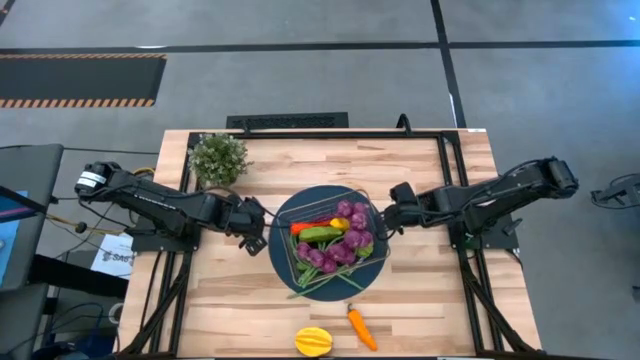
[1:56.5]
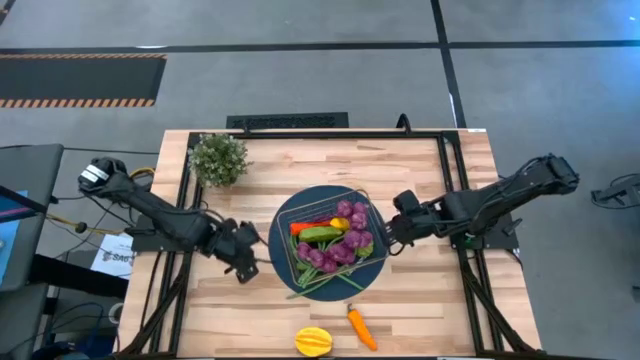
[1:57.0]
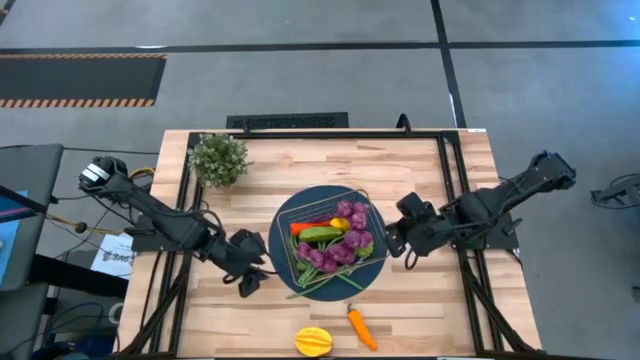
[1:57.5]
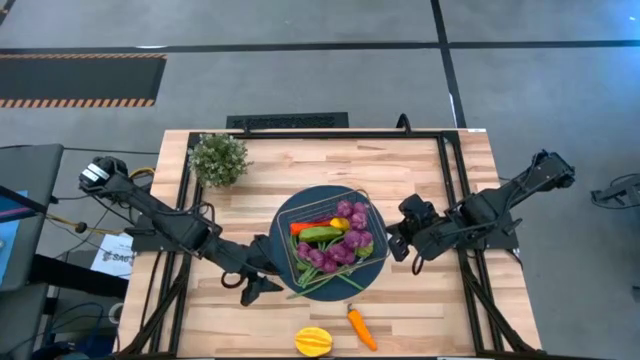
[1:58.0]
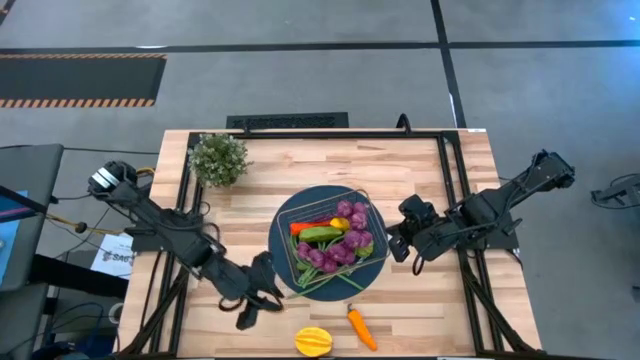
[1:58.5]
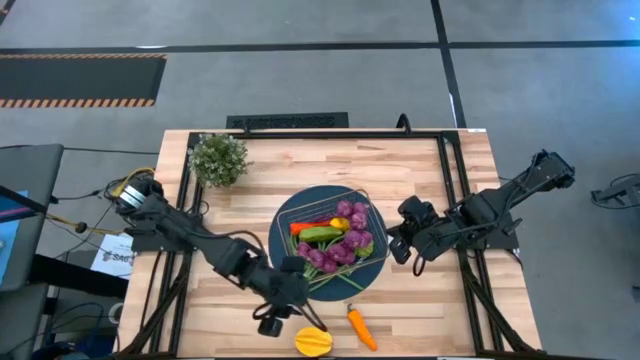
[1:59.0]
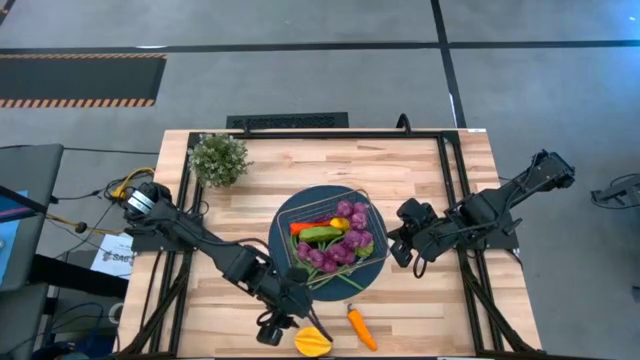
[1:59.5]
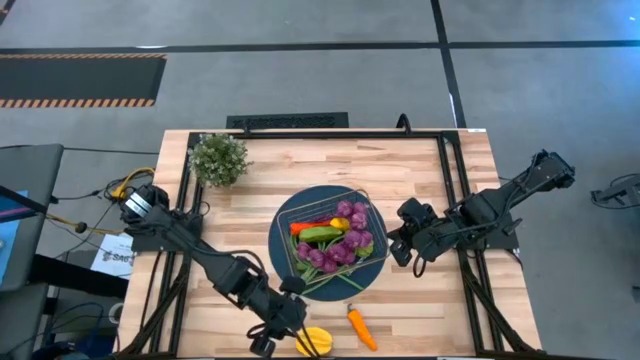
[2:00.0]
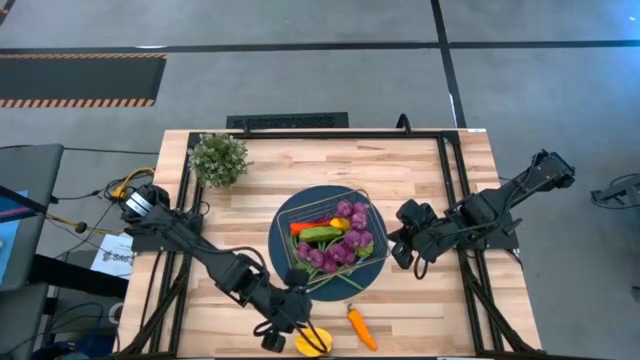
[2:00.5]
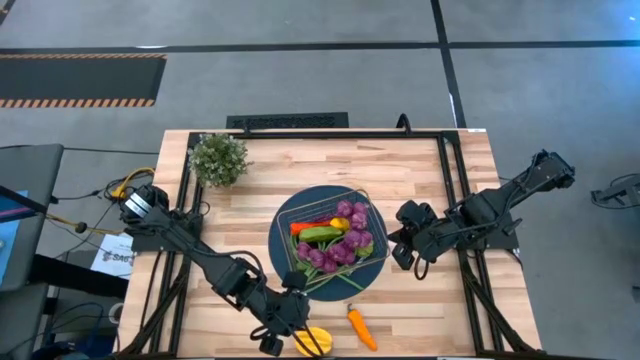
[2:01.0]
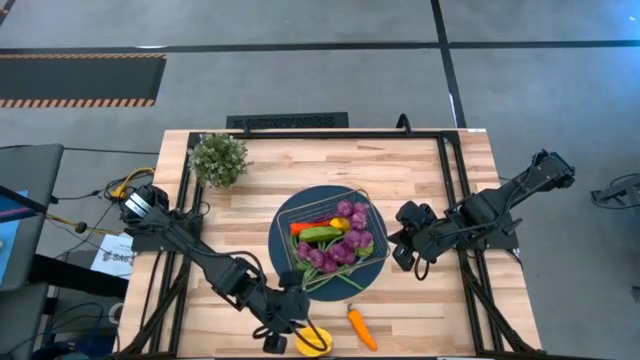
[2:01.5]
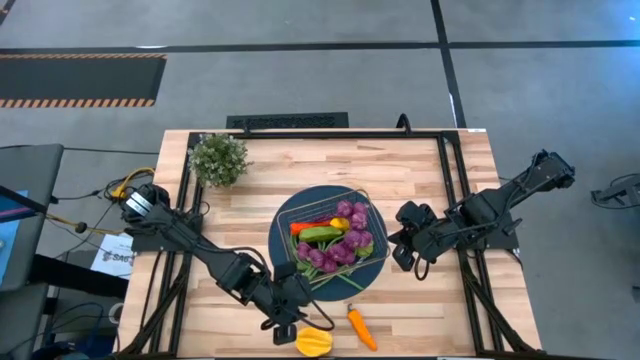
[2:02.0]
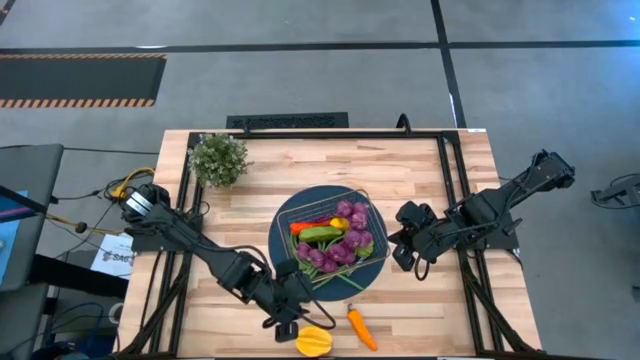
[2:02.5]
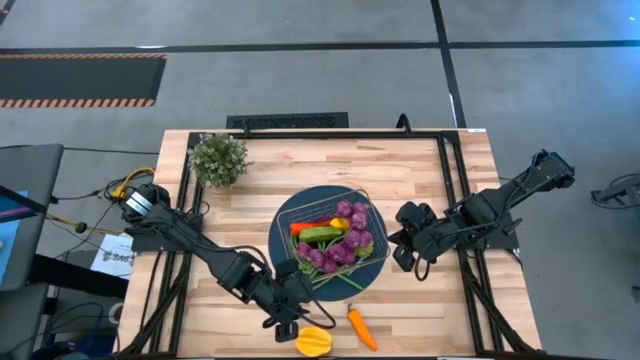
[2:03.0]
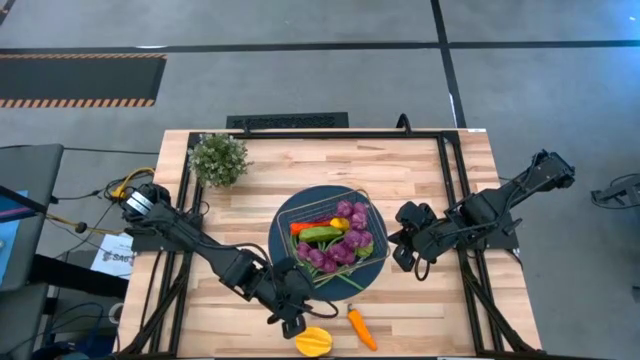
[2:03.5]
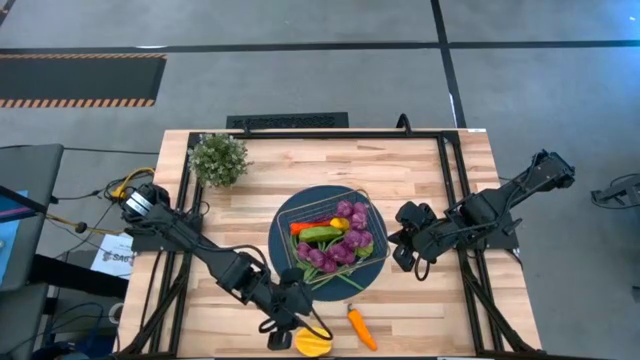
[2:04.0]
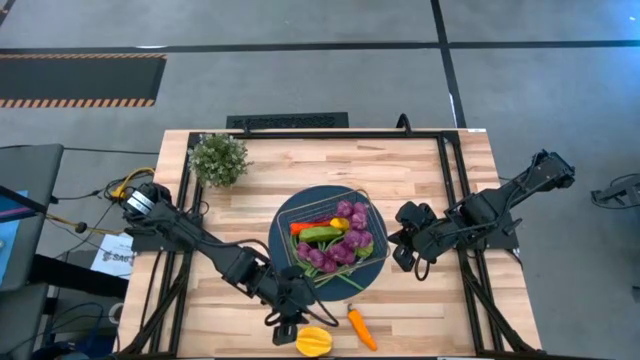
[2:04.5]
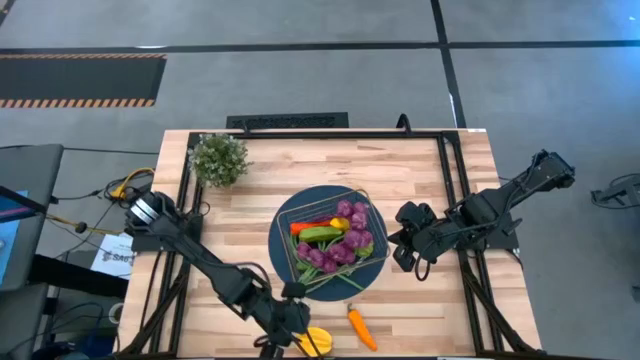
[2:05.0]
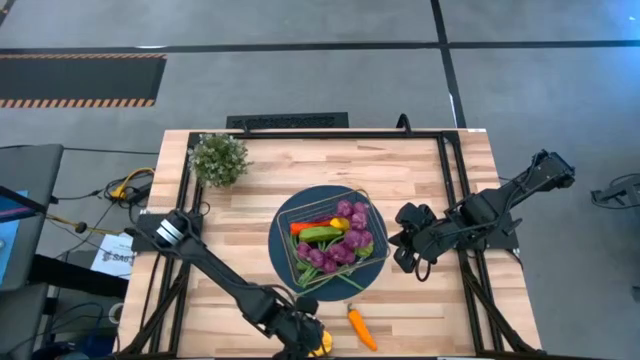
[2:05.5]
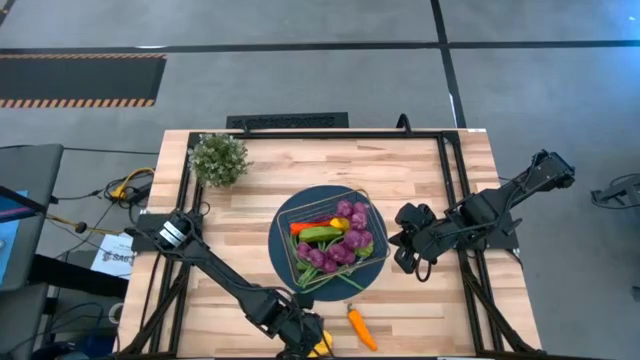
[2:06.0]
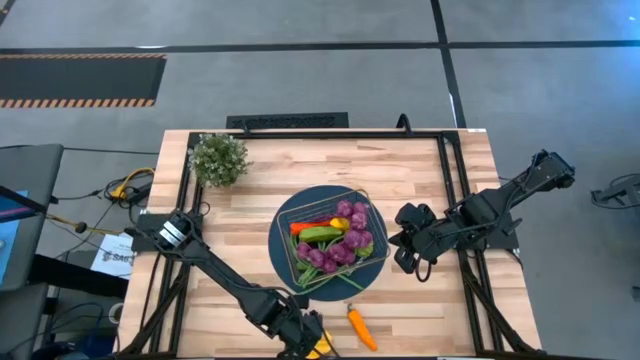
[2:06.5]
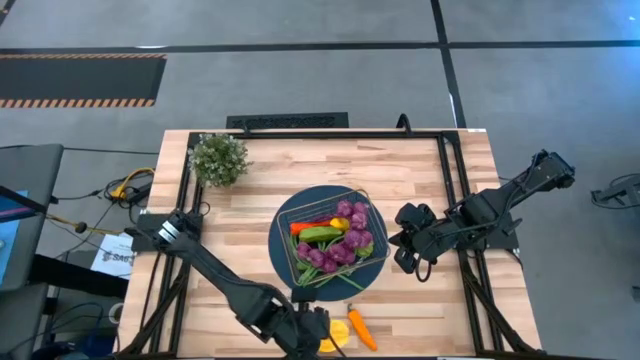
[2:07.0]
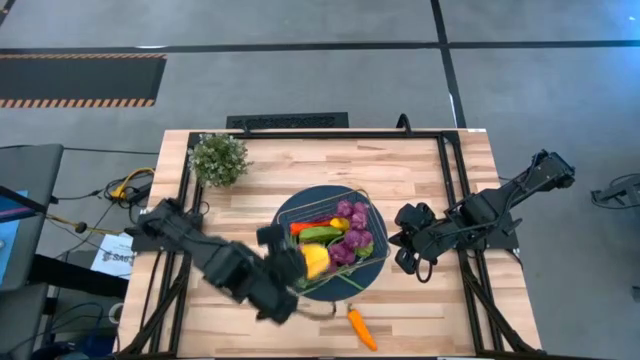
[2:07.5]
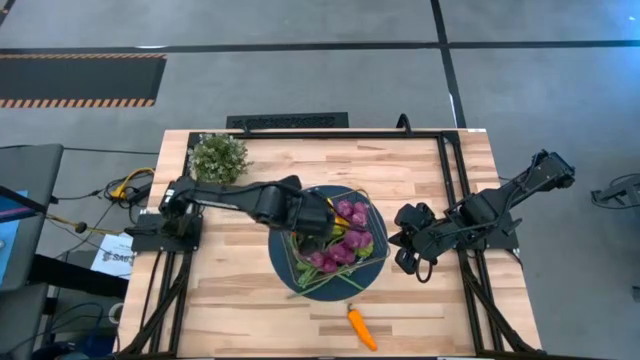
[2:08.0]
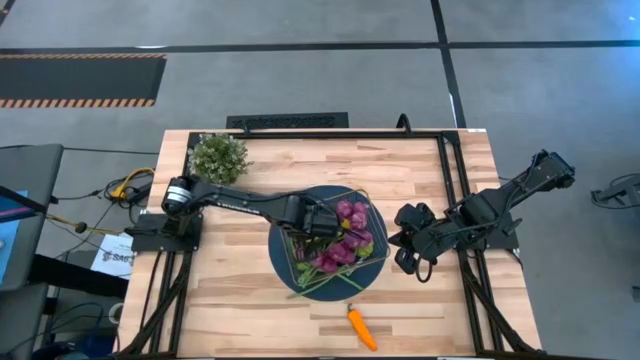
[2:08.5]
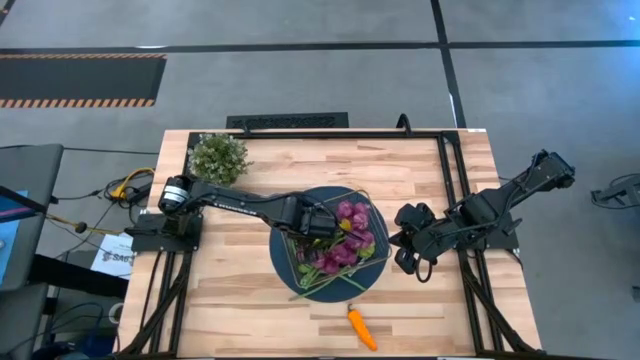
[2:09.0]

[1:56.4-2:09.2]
Task: Build produce basket
Put the yellow starfruit into the gold wire basket

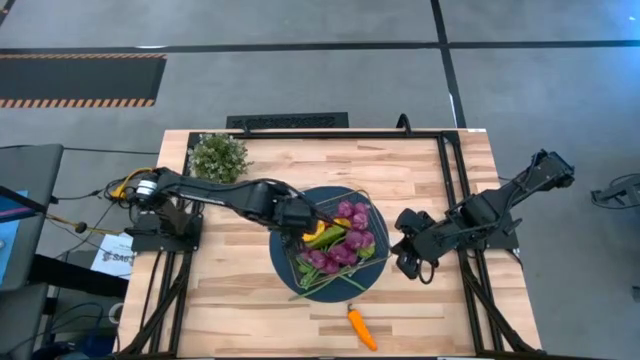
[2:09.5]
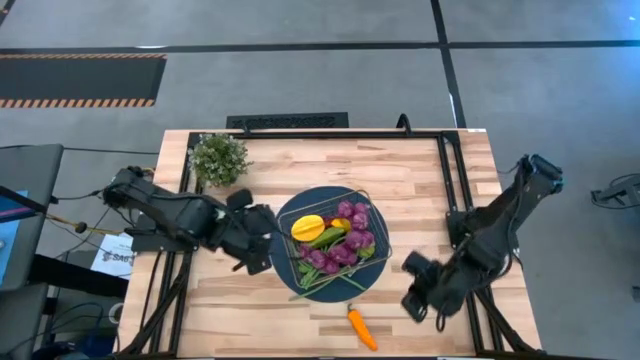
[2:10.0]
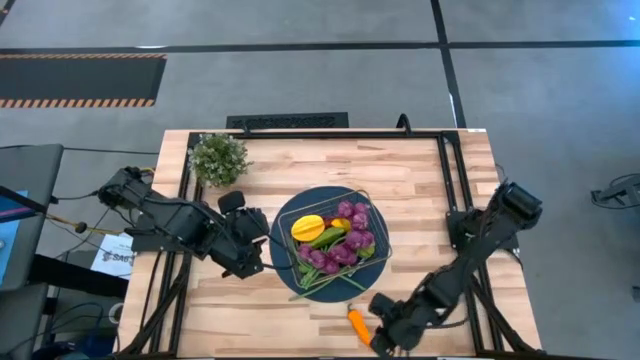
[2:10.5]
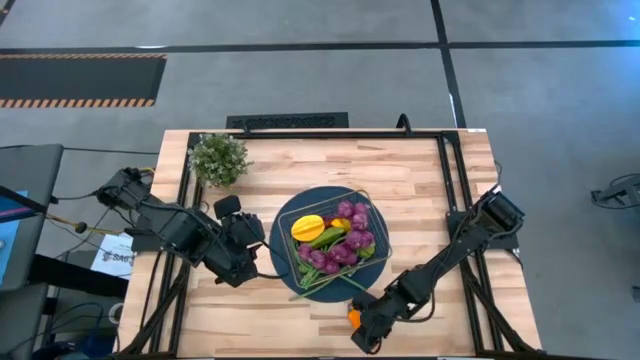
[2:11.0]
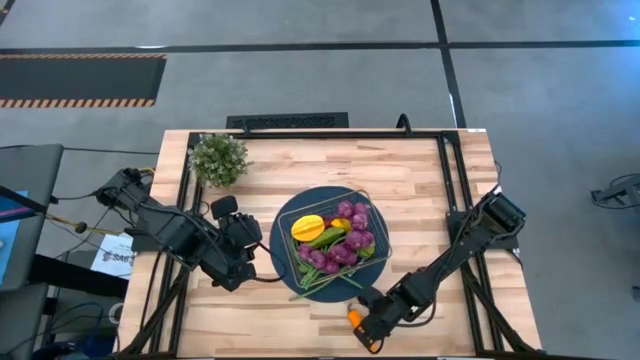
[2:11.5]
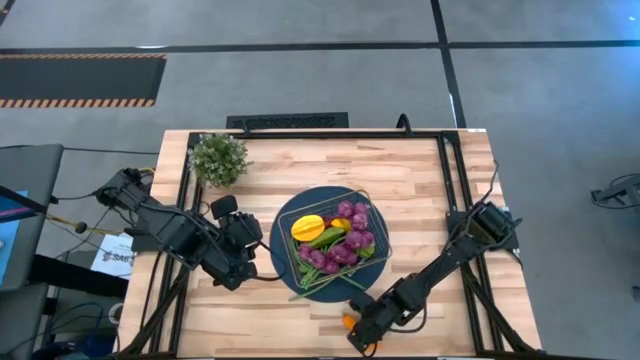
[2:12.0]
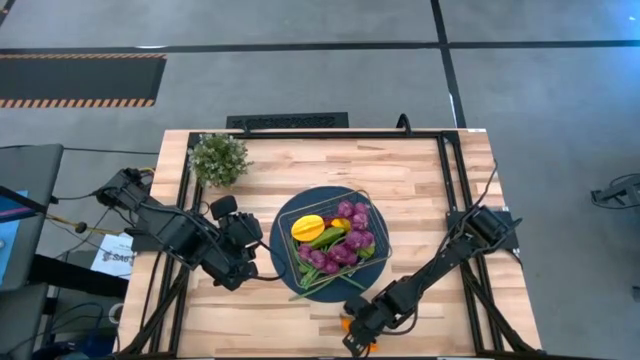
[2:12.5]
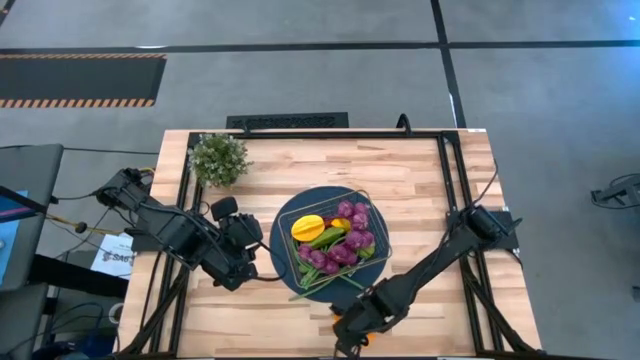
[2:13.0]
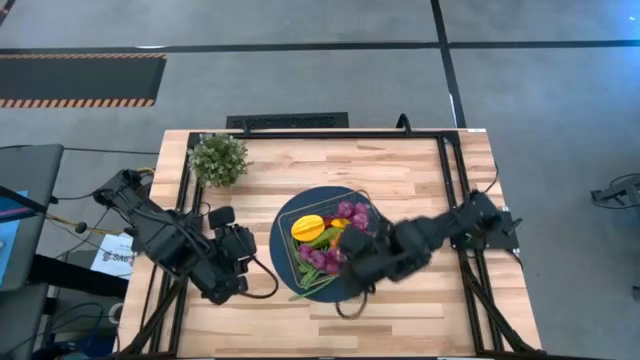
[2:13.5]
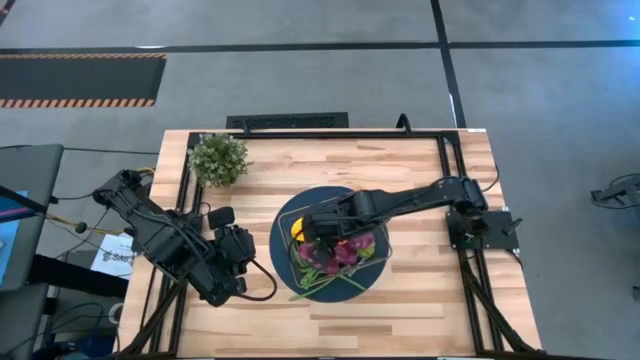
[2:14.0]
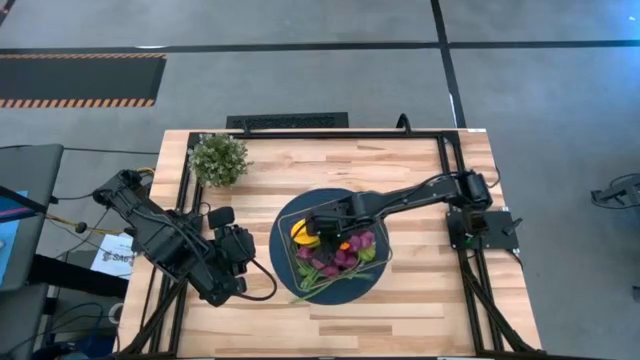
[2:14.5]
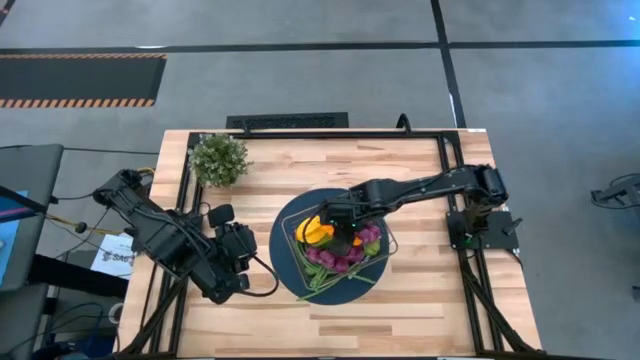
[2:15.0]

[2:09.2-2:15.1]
Put the orange chili pepper into the gold wire basket
